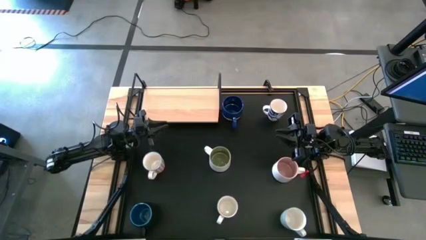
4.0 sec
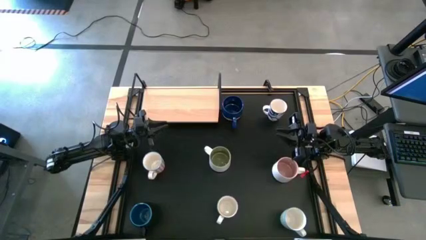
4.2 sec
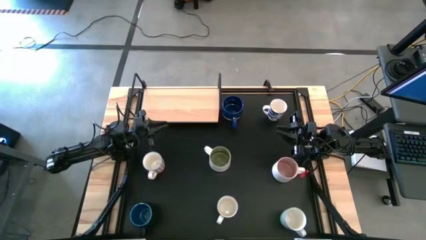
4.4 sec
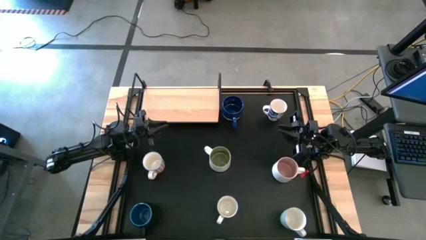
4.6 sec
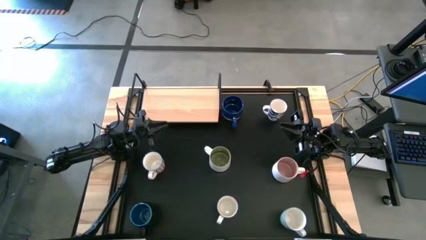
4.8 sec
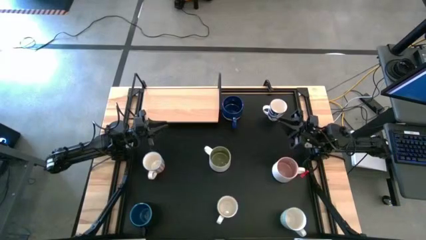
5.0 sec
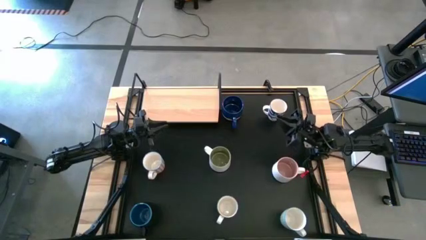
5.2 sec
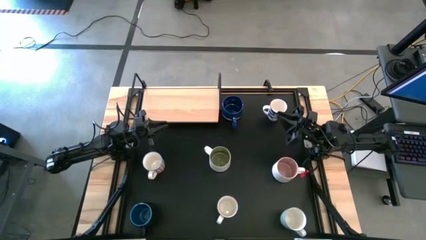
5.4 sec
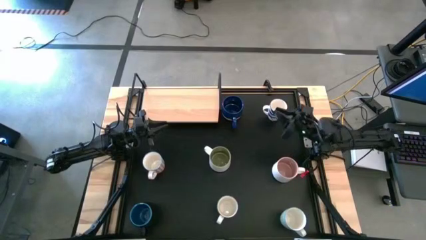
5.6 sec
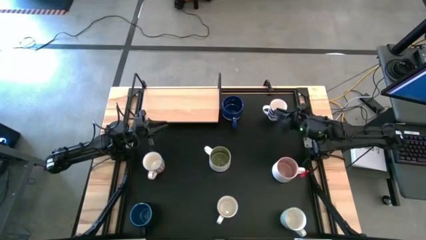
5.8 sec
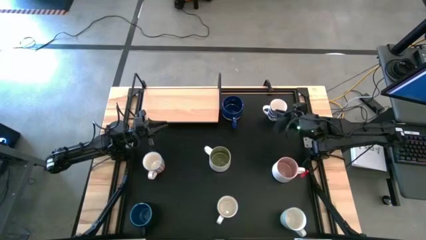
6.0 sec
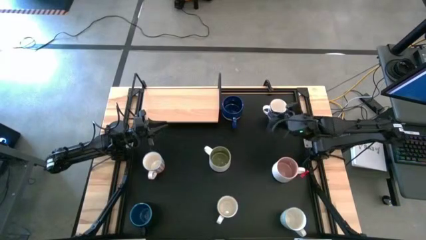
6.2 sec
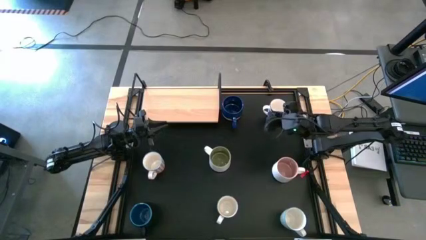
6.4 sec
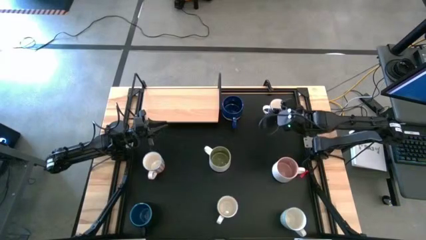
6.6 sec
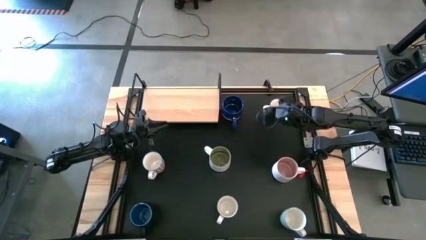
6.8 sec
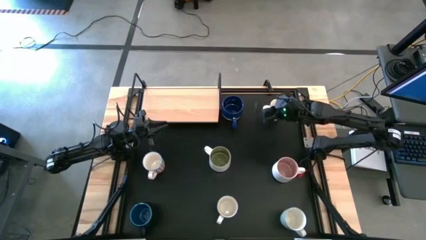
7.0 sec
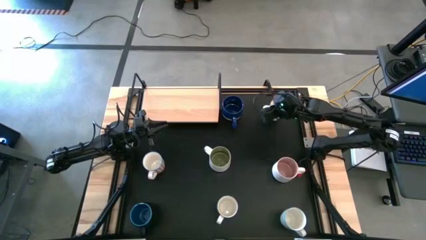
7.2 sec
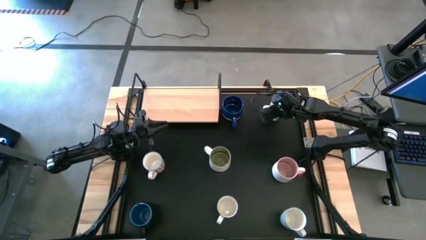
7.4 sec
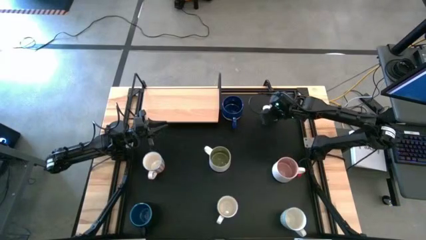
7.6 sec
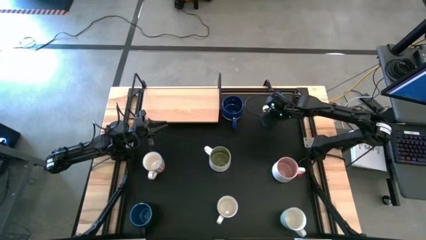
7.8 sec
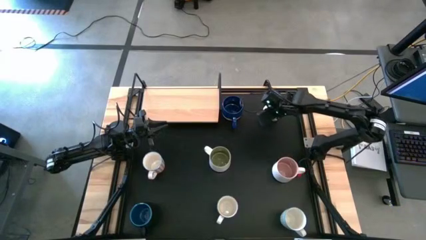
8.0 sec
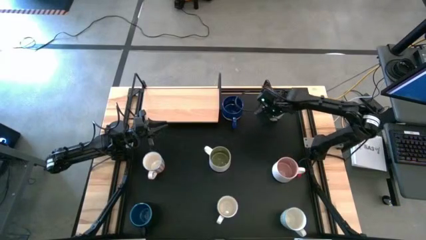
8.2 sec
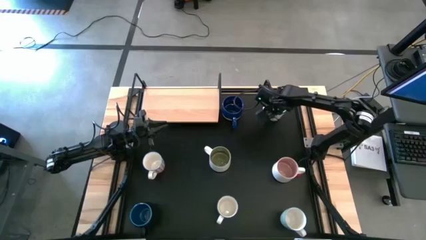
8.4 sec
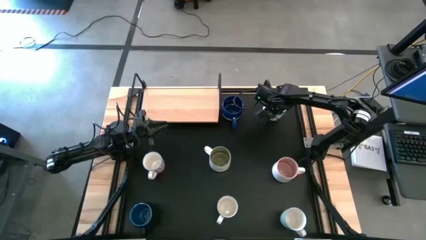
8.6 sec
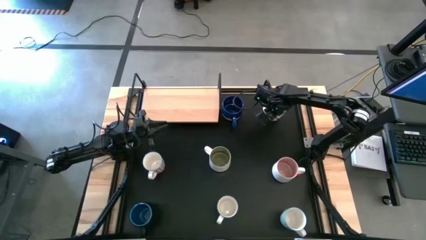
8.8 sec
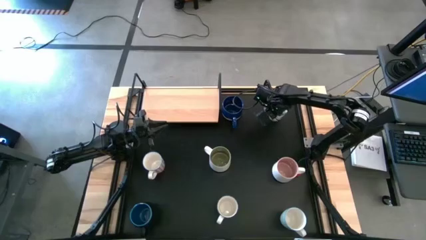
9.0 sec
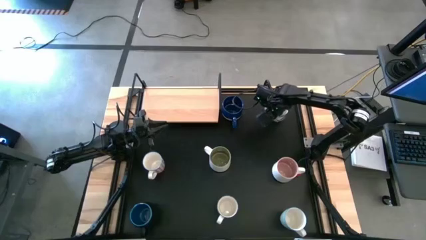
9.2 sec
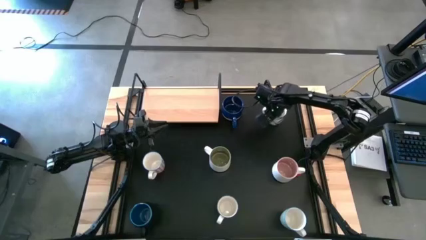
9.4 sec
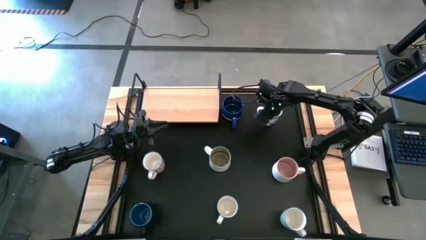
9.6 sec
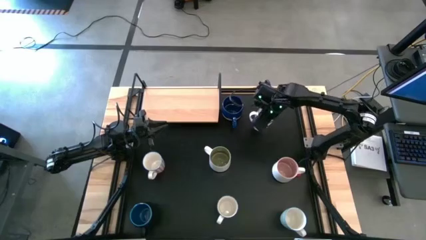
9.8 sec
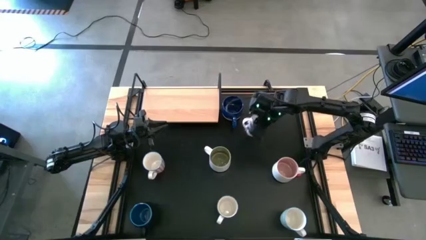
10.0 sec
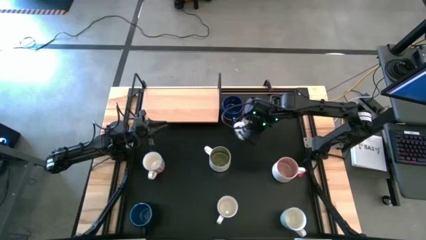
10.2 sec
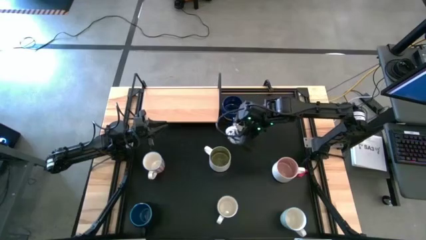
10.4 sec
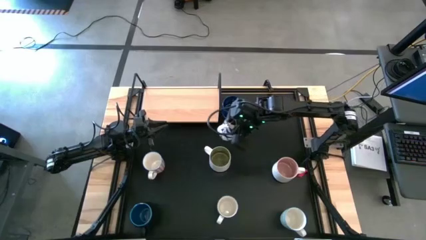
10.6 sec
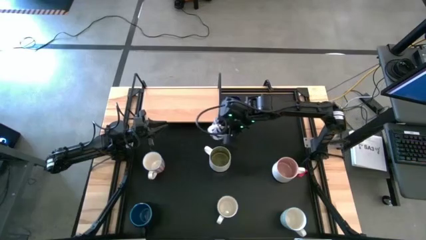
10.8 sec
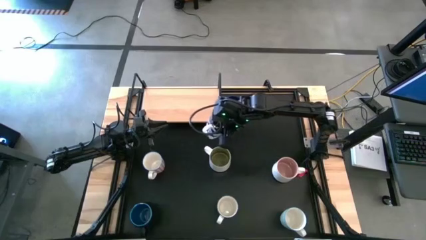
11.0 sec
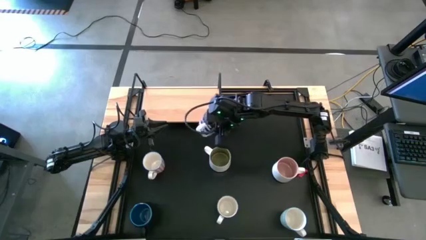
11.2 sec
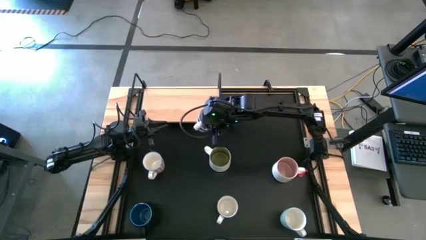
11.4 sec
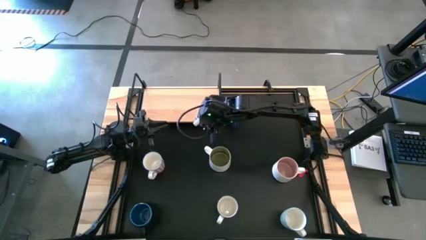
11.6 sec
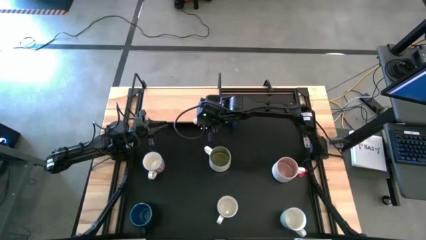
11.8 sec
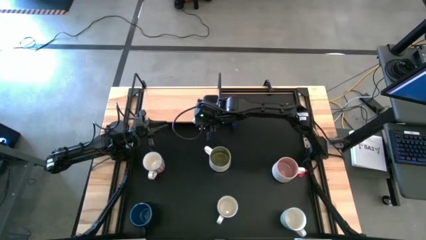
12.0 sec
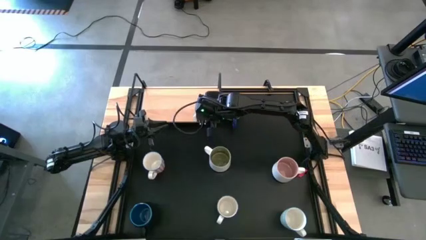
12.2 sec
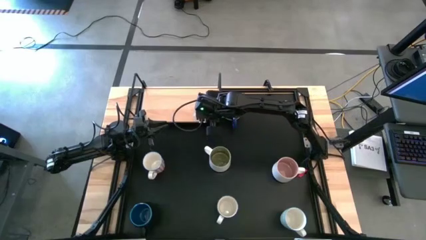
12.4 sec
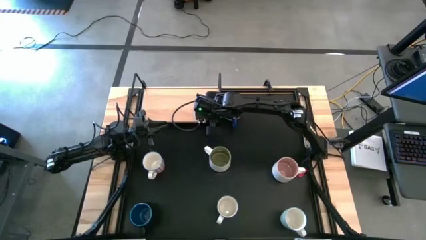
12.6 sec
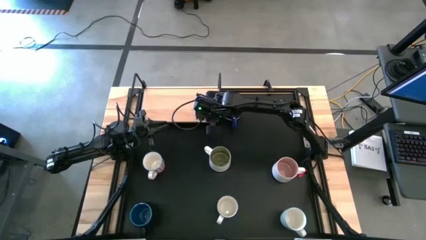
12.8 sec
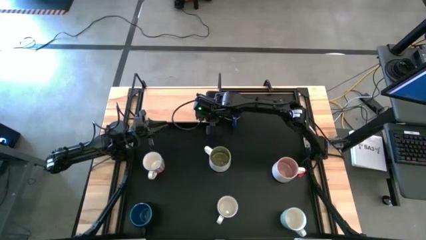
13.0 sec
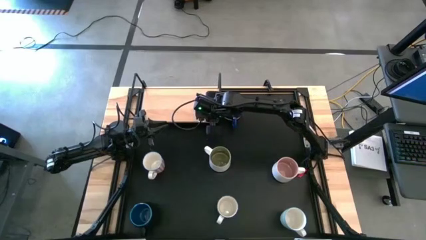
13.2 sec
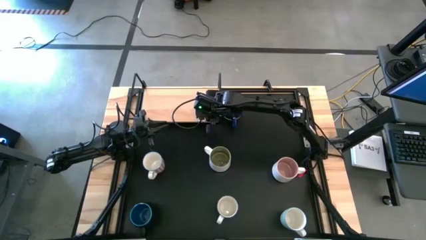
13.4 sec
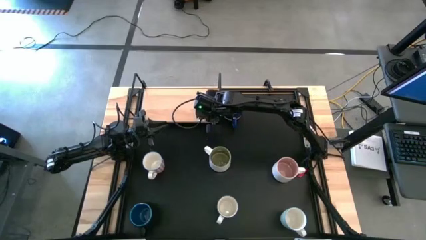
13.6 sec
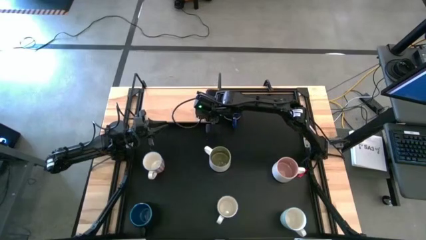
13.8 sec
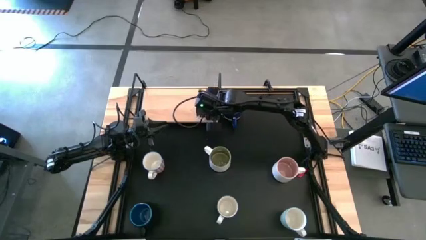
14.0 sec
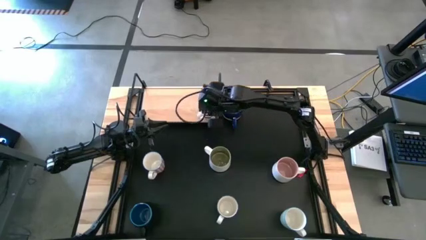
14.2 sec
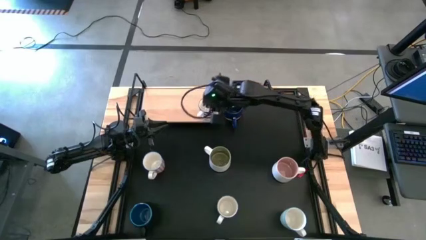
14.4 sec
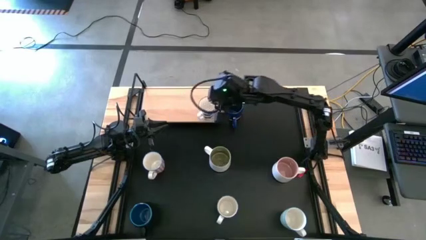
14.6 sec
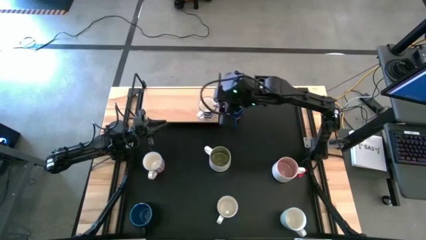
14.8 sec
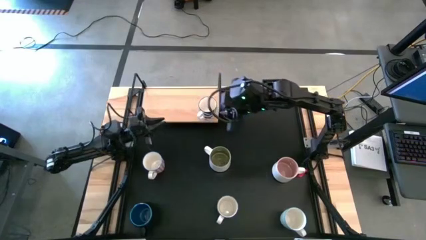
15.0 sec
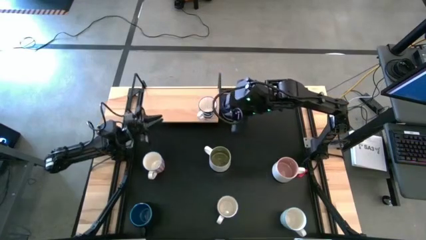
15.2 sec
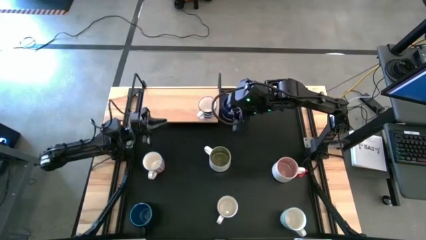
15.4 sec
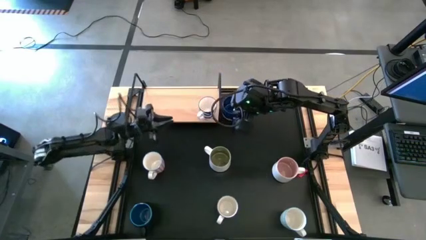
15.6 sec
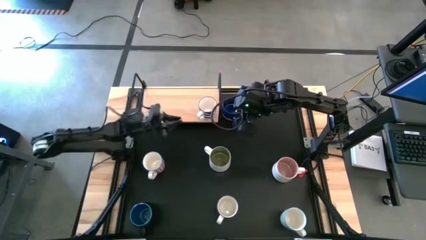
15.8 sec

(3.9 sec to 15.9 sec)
Task: Place coffee mugs
Put the top blue patterned mug on the shelf
